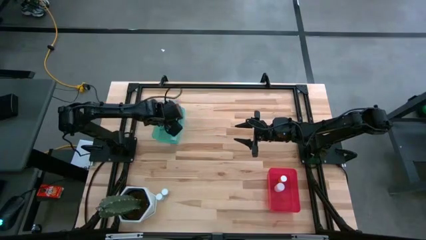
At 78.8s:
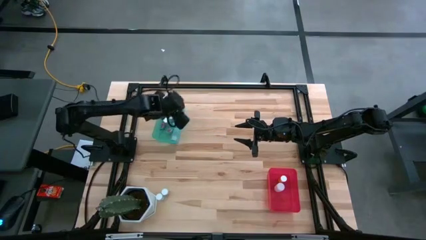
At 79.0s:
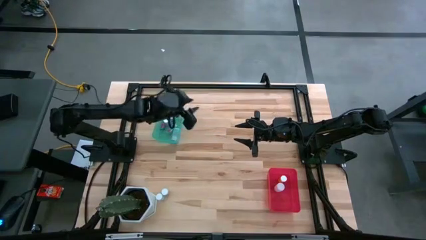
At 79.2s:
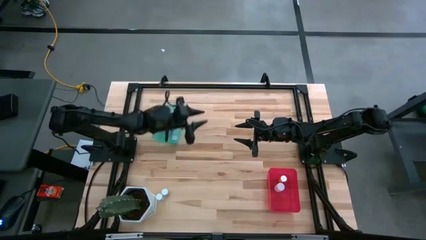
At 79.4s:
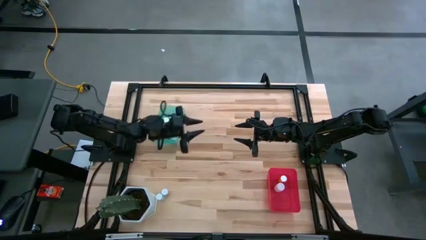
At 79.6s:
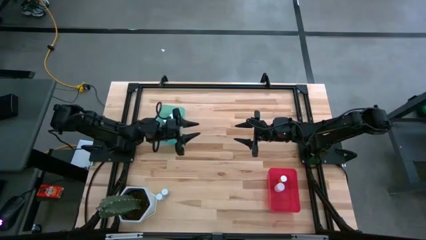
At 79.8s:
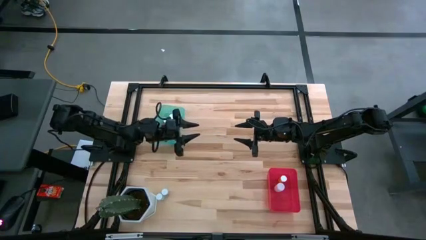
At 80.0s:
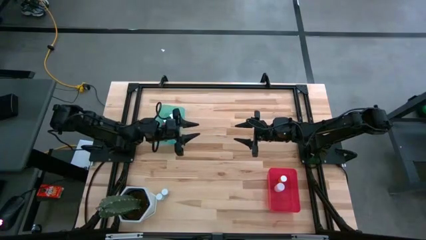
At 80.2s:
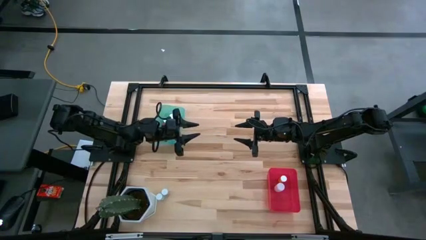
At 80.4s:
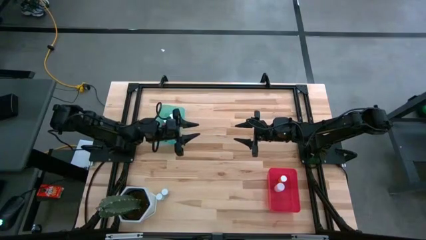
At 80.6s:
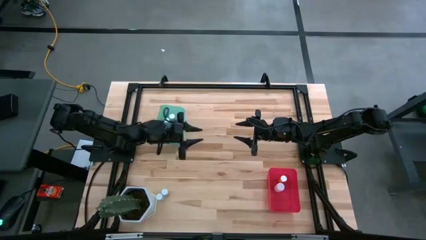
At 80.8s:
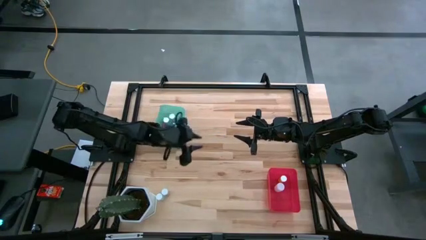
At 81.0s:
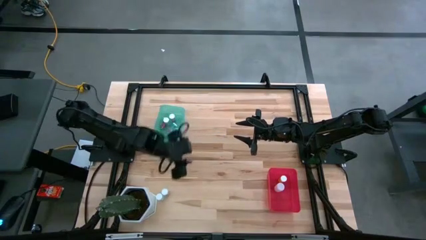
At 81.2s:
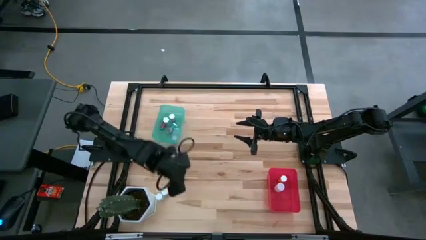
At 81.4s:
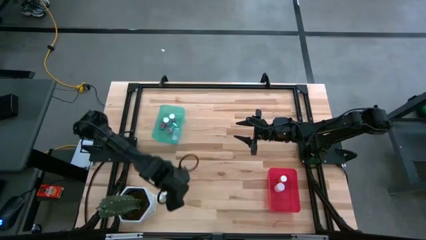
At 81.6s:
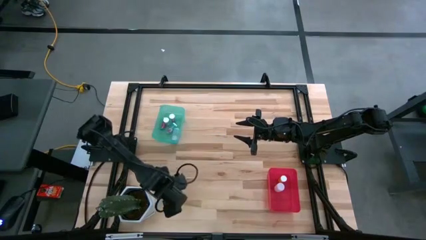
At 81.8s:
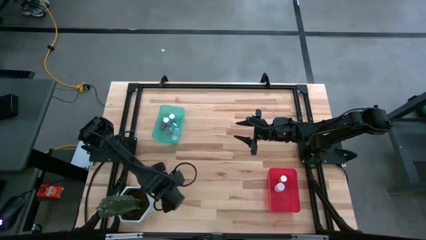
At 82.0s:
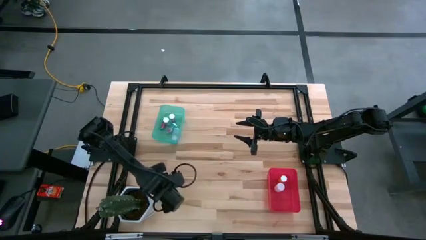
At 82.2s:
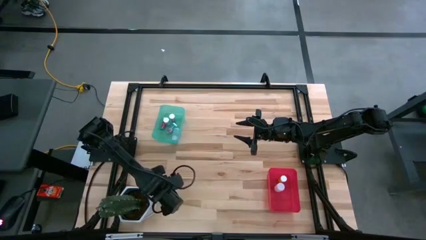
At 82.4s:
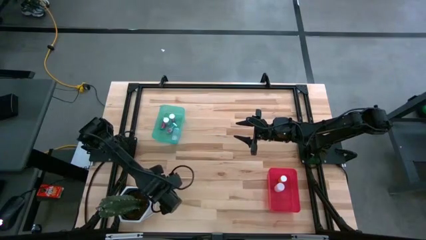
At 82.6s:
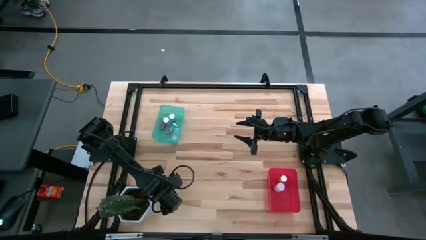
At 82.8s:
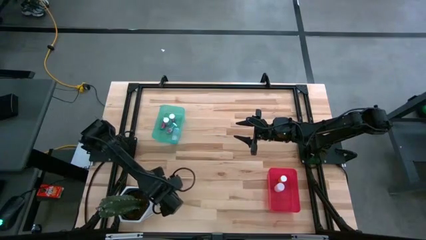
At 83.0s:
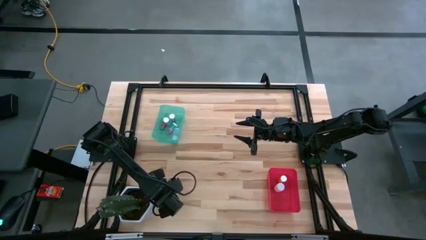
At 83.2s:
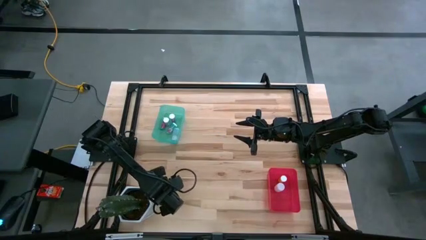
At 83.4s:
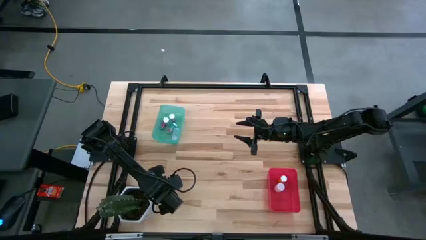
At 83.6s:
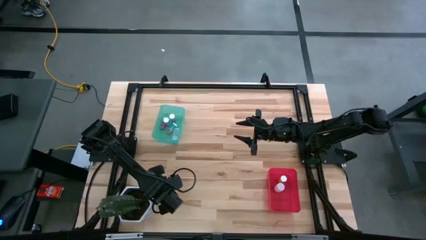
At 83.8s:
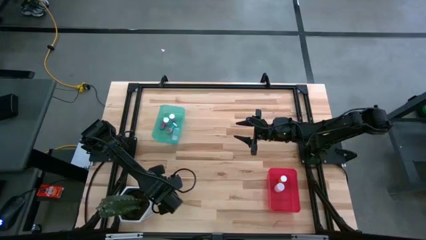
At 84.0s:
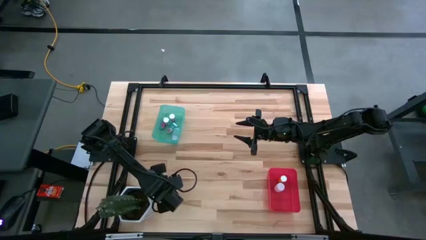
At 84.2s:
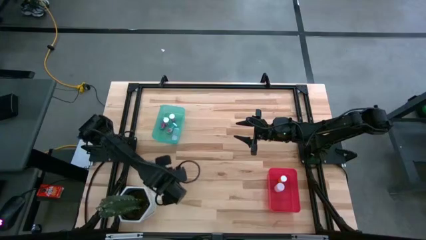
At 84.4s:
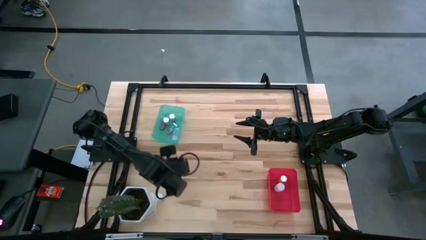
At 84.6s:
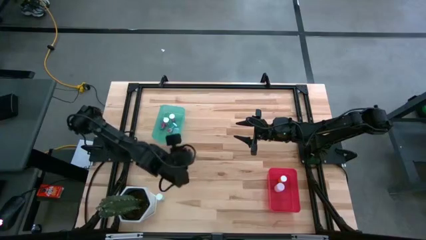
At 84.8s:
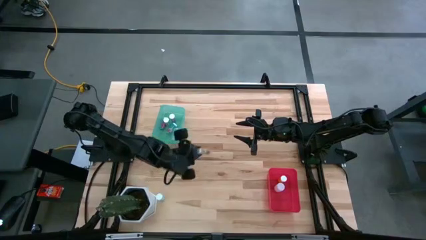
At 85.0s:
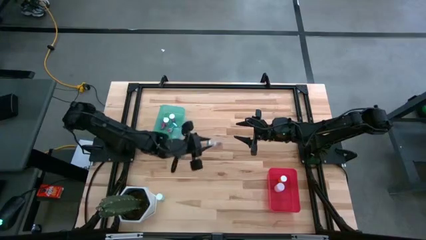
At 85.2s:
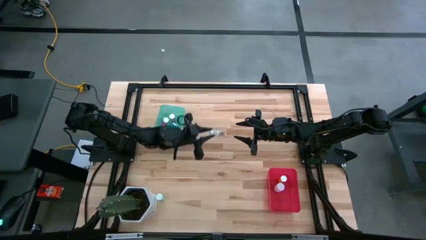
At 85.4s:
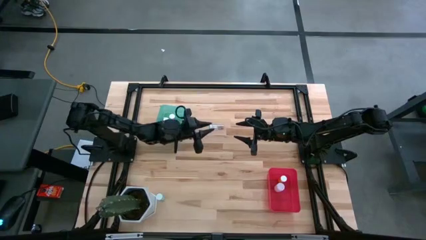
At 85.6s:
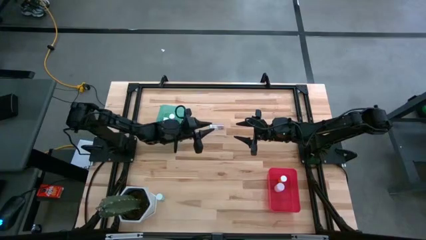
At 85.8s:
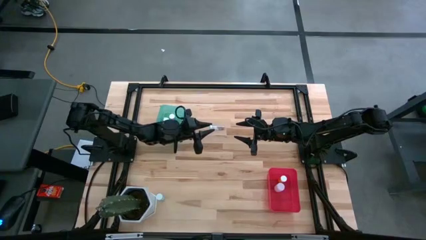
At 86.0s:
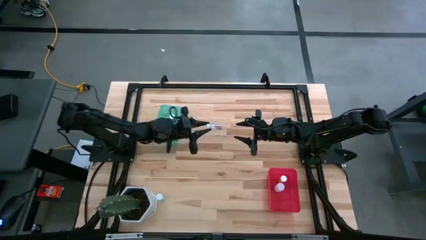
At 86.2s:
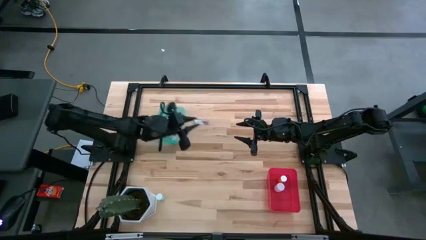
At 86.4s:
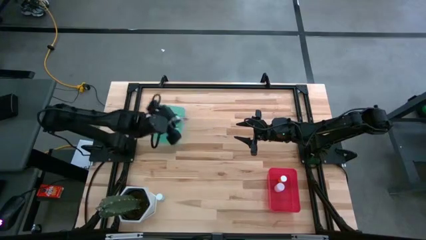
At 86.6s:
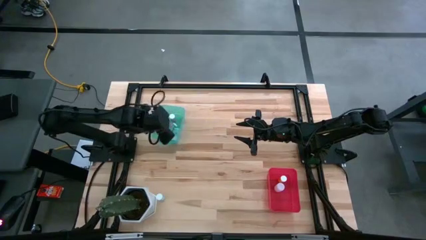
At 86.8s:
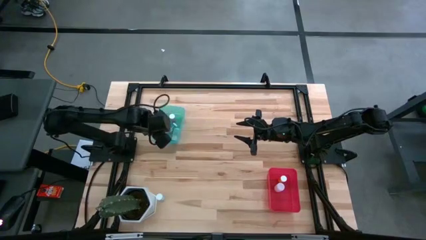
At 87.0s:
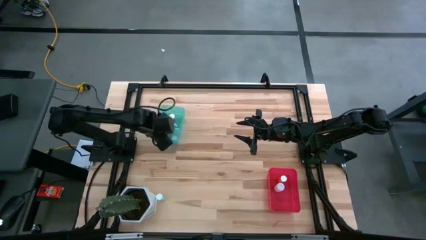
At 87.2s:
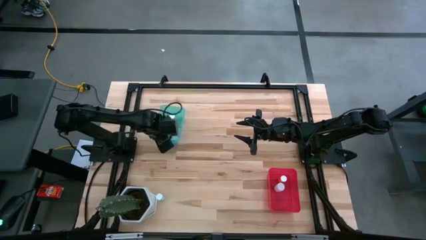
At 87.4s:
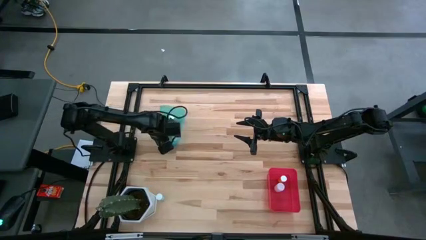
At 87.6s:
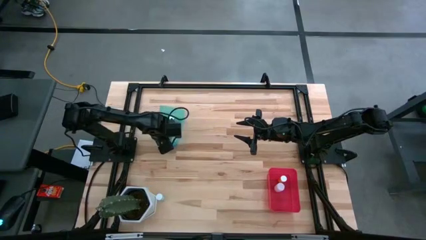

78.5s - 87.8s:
Task: Pick and place medicine bottles into bin by pill shape (circle, oval)
Put the blue capsule bottle into the blue bin
